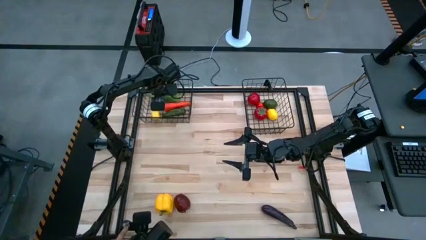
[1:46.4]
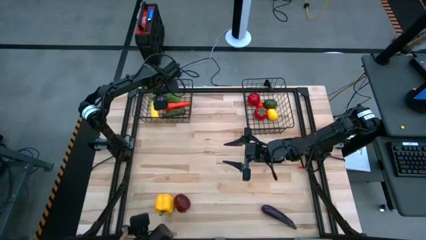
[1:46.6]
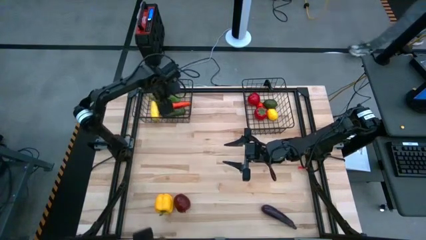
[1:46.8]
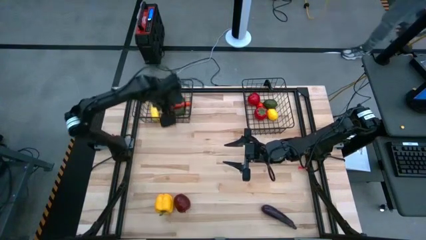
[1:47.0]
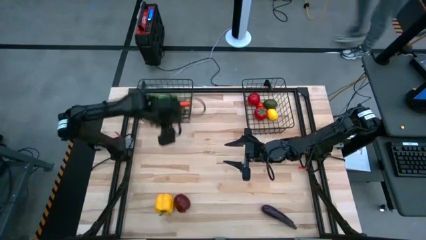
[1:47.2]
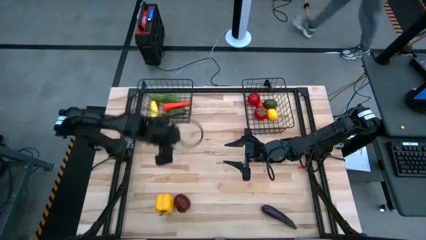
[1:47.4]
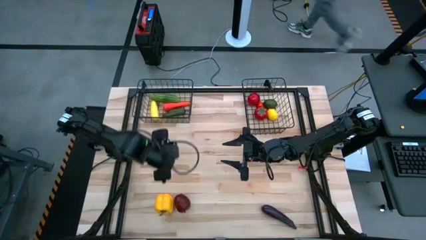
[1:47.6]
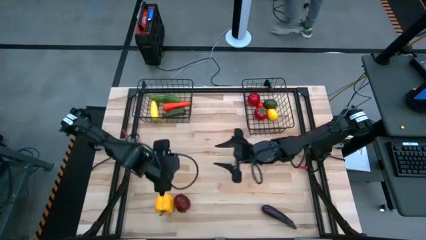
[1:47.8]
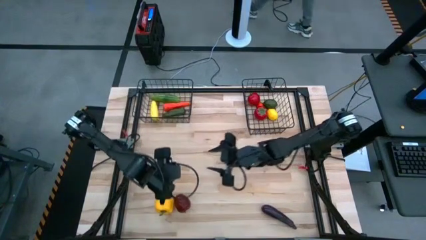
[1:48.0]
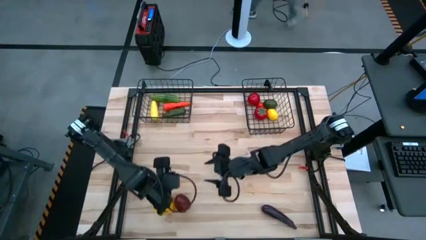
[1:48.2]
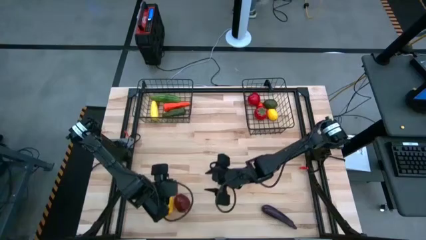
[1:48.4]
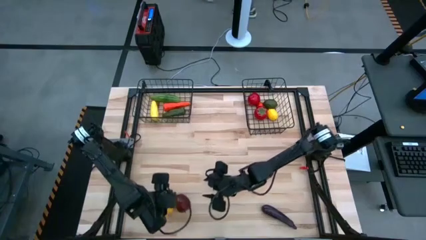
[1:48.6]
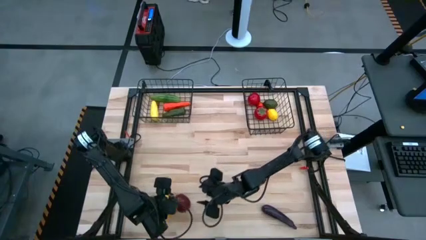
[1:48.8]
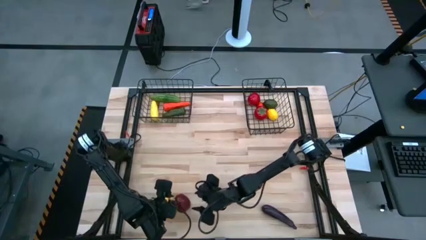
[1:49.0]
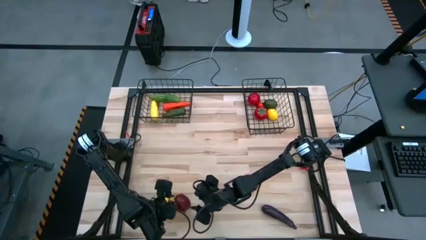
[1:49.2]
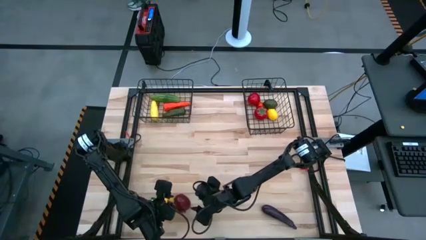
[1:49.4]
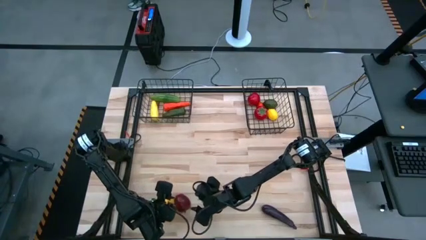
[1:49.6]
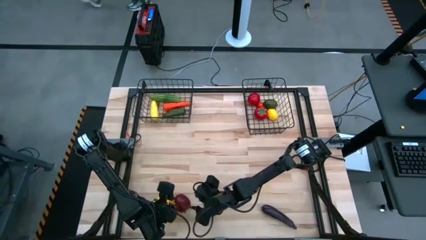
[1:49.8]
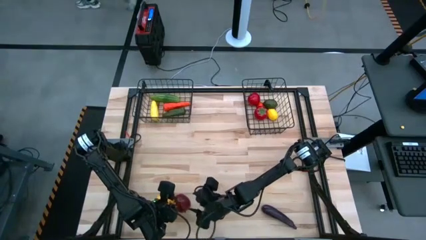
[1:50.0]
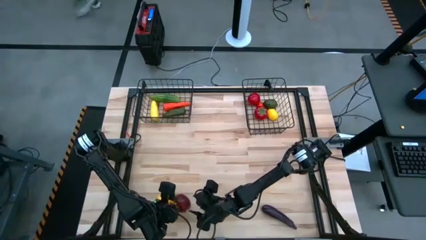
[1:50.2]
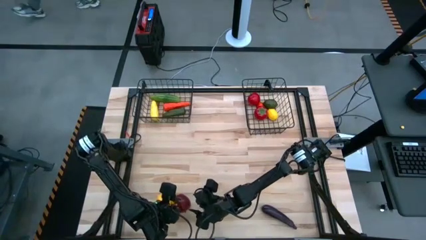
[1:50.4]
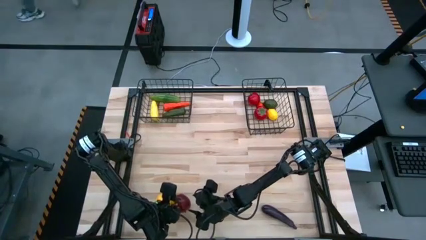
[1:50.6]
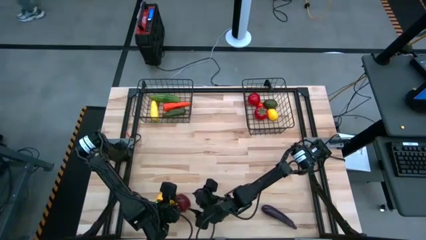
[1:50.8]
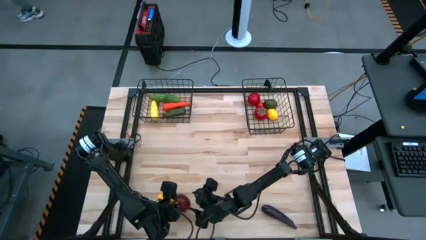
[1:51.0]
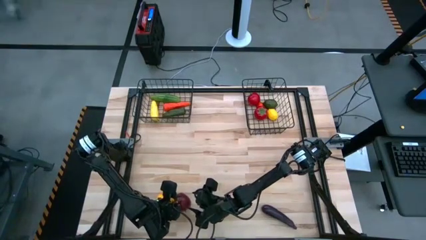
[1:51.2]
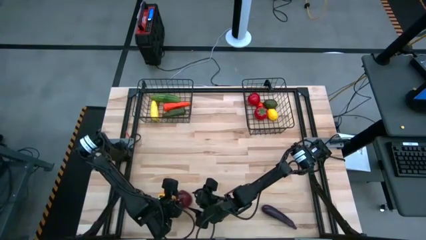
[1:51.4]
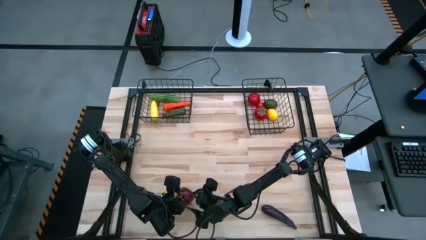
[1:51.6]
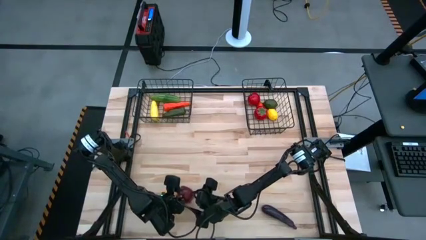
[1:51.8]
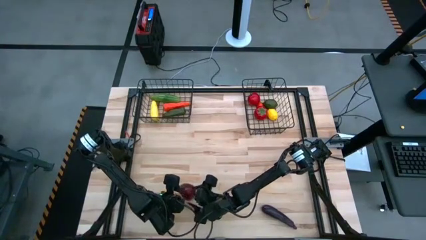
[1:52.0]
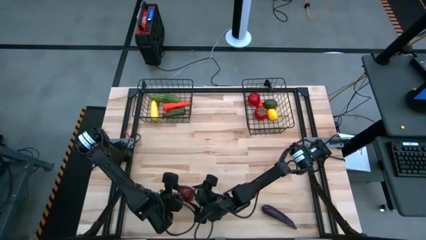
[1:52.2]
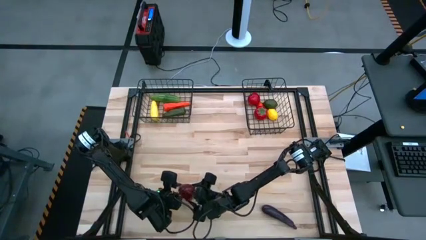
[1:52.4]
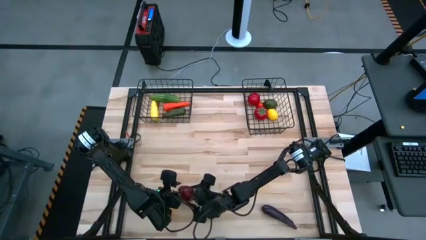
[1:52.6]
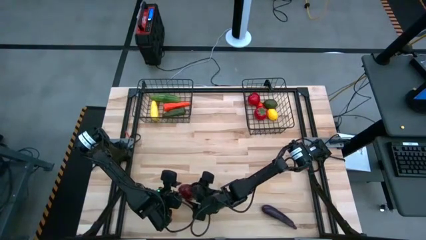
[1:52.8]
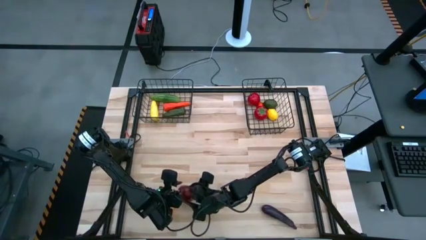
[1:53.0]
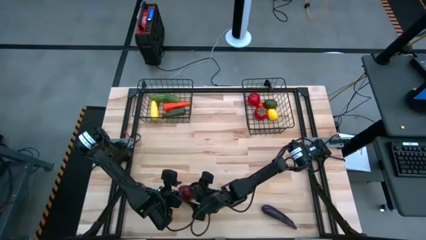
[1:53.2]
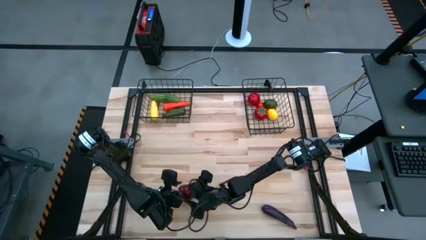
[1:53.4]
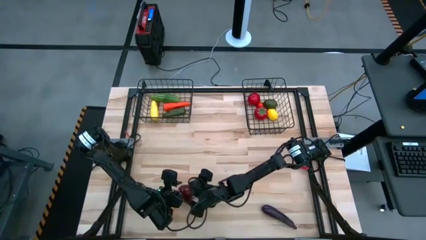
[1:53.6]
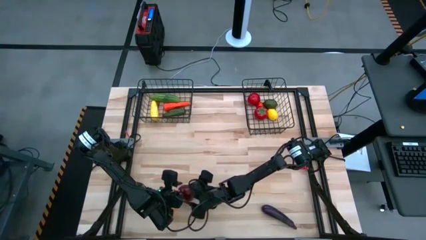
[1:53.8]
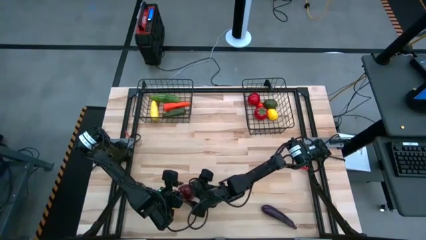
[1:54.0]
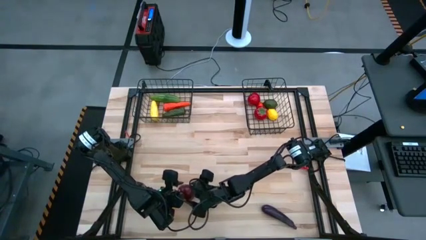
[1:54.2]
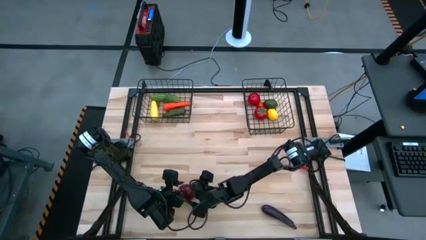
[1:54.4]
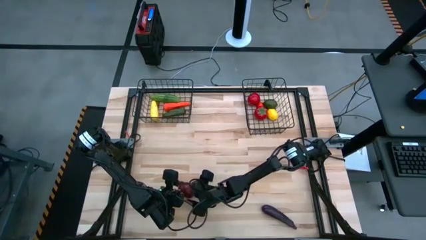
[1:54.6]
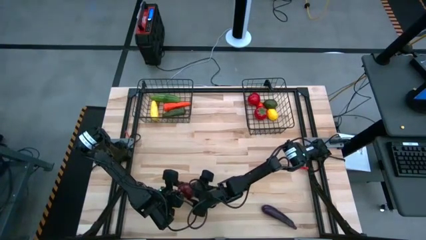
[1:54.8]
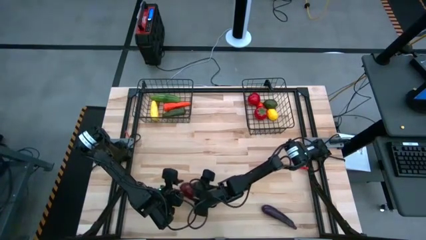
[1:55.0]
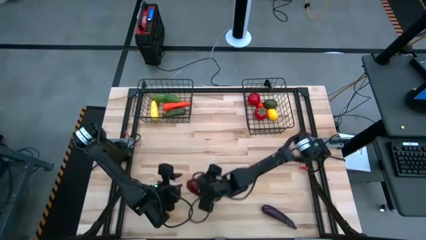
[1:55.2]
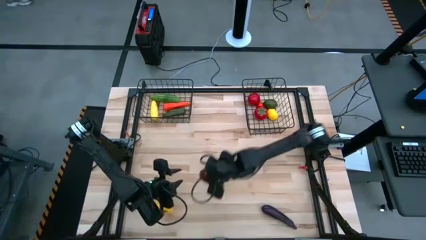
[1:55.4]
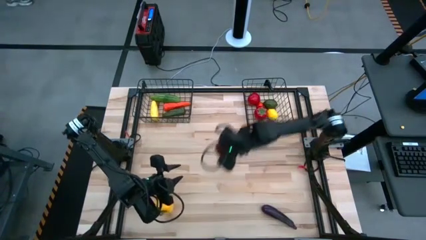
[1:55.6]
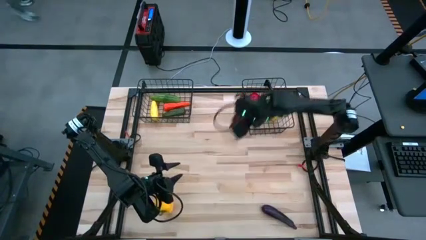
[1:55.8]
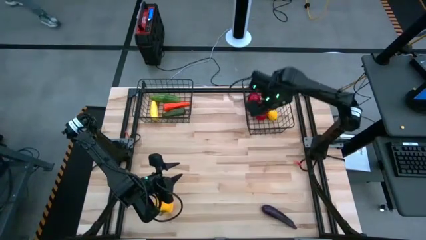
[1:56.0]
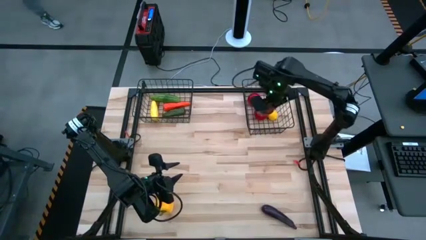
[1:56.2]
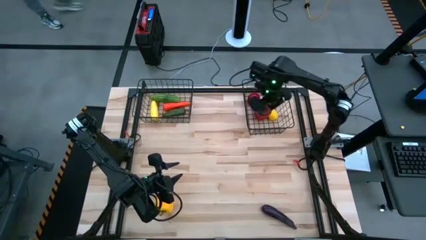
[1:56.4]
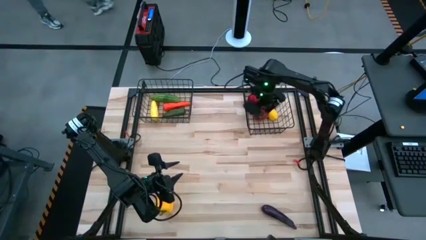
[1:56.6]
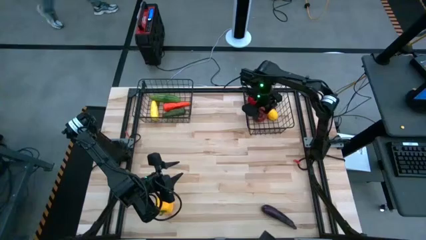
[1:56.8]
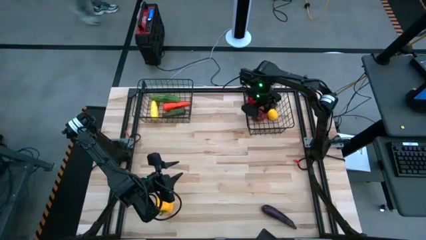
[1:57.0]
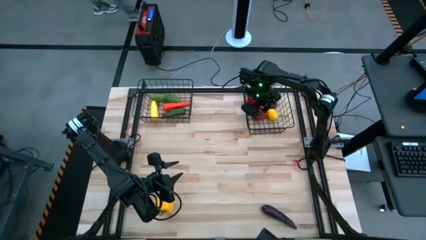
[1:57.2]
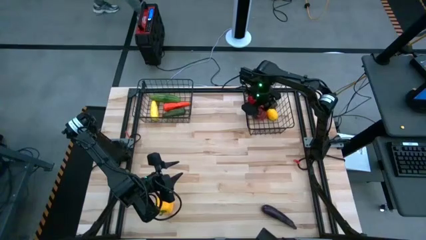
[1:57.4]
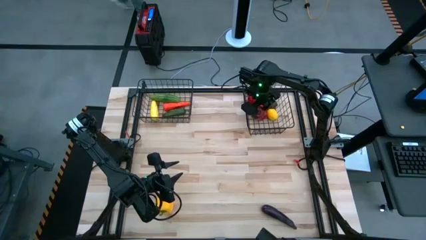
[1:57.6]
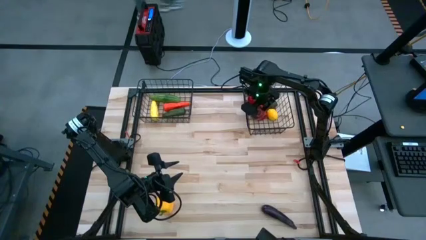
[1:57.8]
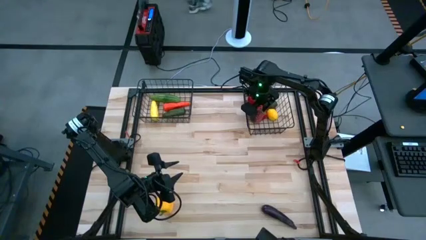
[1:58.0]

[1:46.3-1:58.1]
Task: Sort produce into baskets
Put the red apple into the right black wire basket
